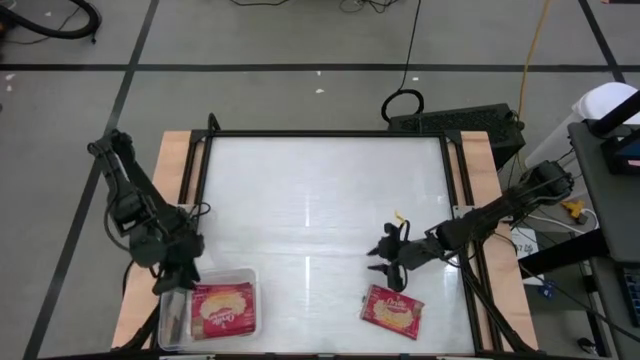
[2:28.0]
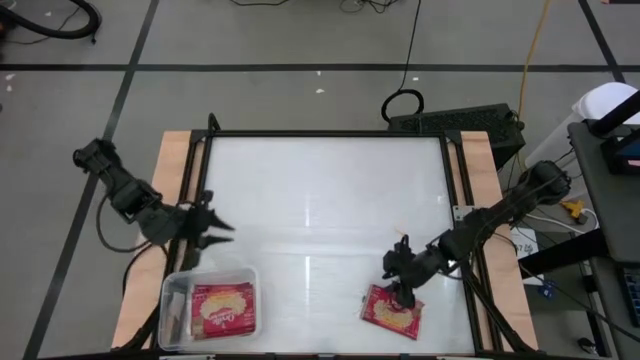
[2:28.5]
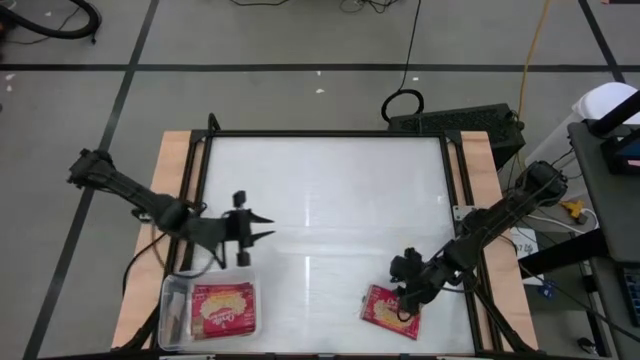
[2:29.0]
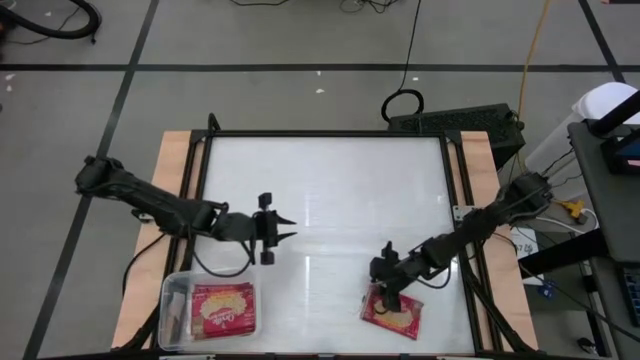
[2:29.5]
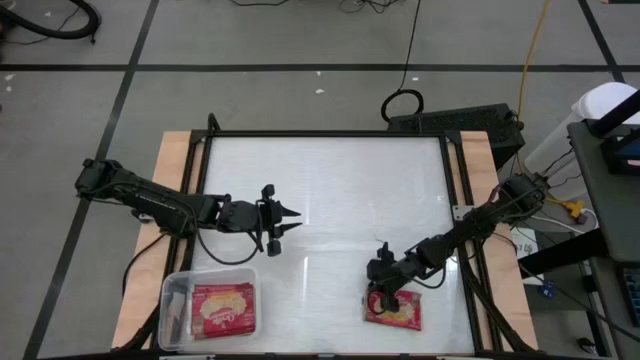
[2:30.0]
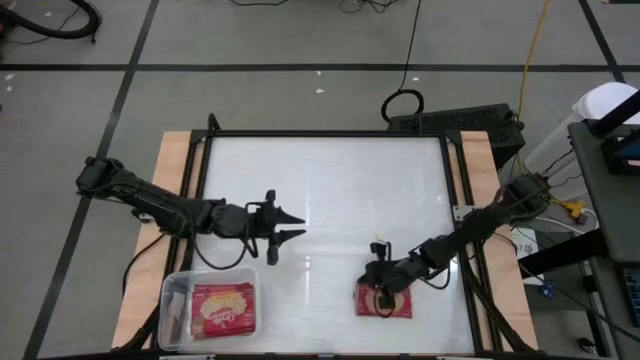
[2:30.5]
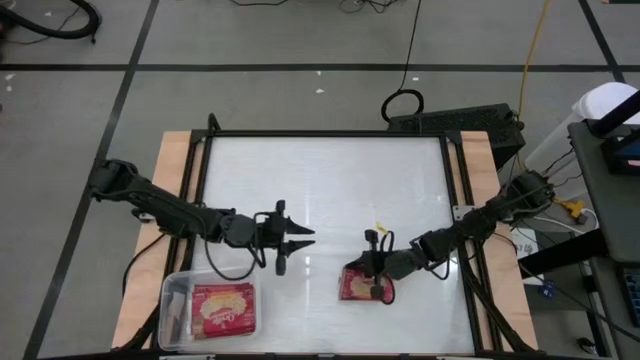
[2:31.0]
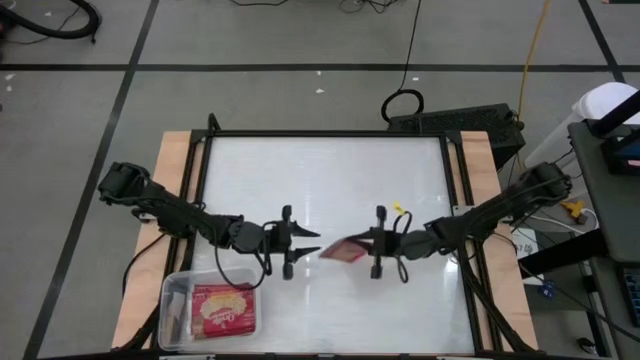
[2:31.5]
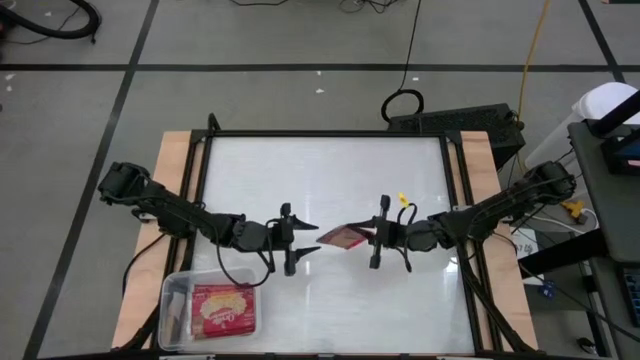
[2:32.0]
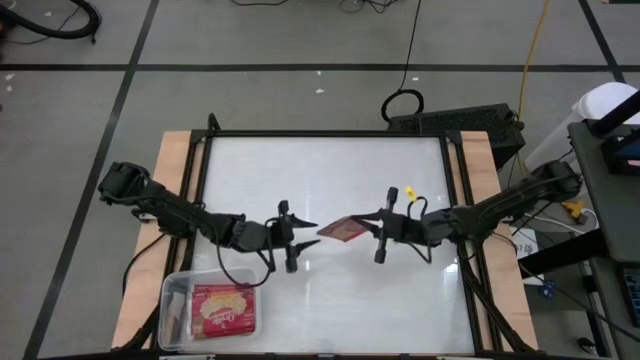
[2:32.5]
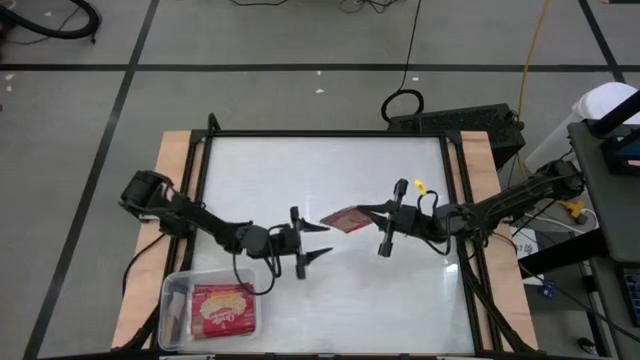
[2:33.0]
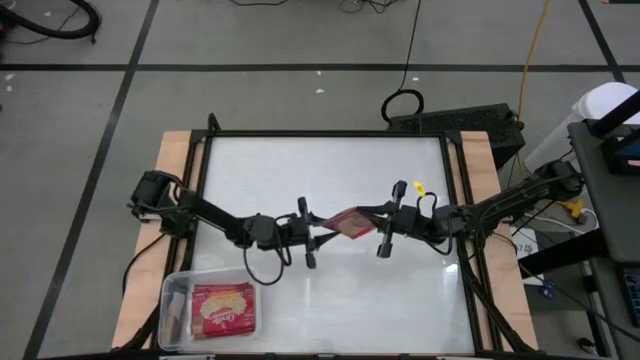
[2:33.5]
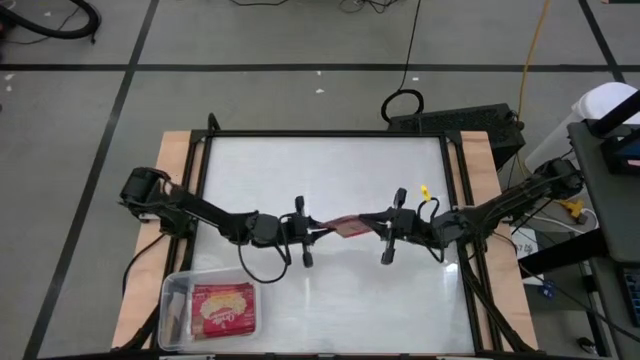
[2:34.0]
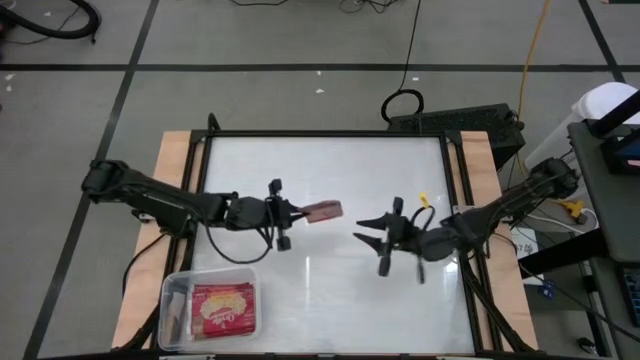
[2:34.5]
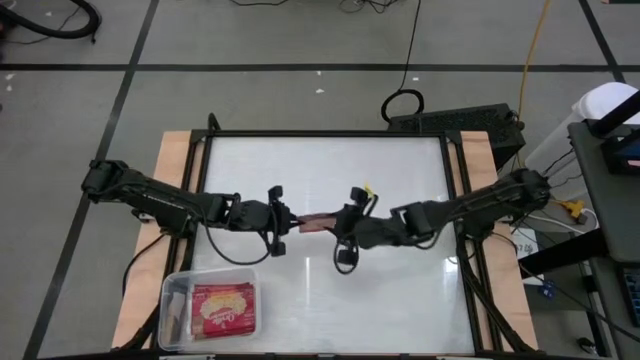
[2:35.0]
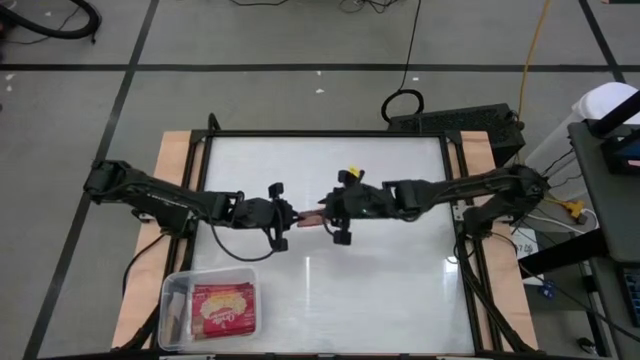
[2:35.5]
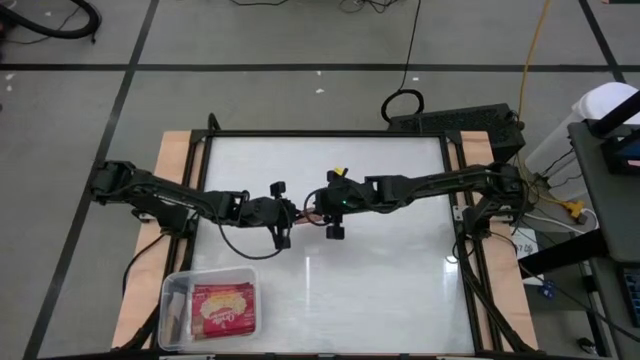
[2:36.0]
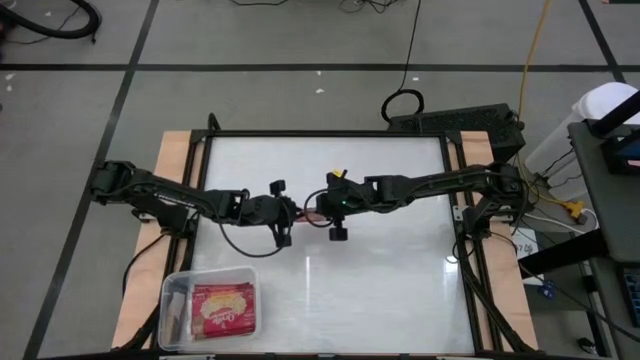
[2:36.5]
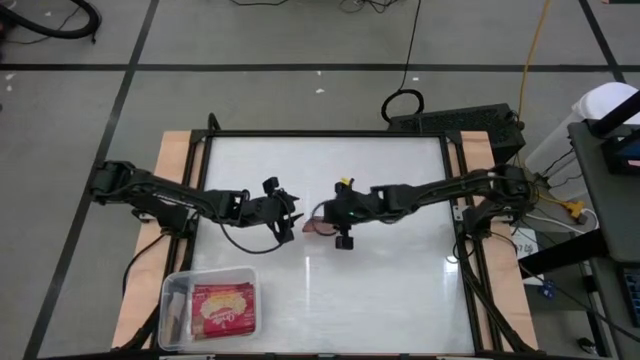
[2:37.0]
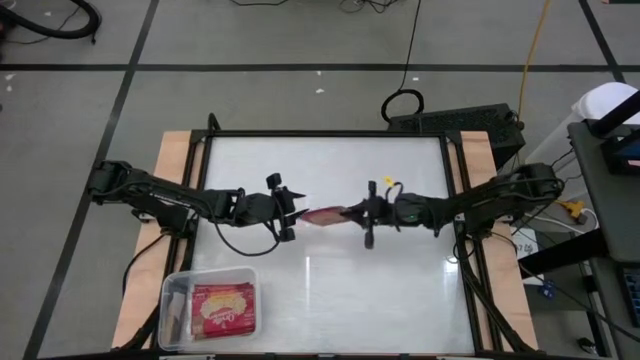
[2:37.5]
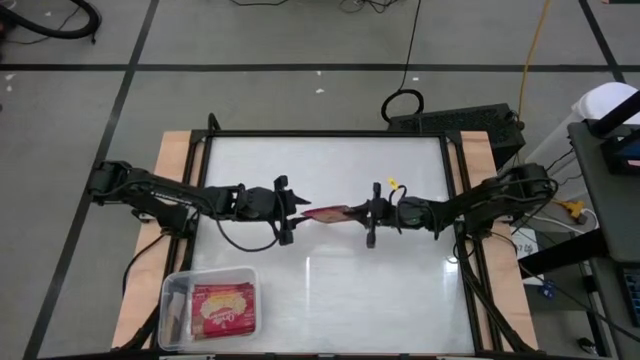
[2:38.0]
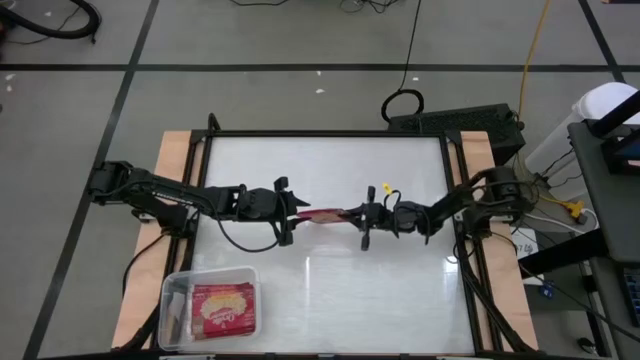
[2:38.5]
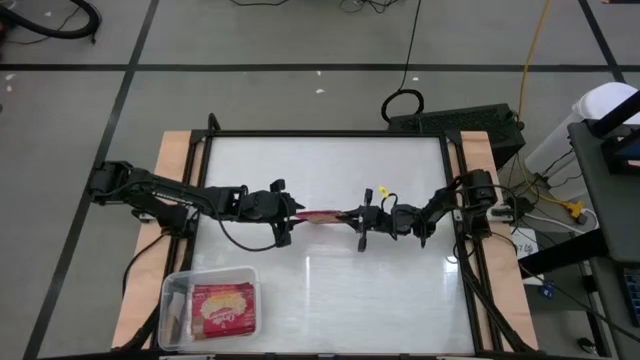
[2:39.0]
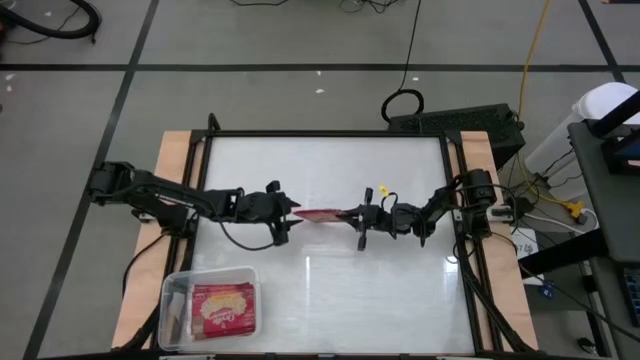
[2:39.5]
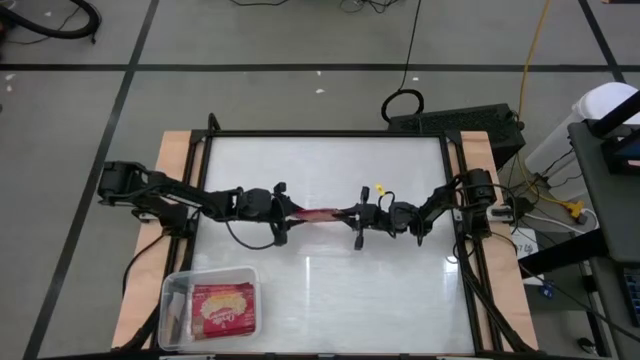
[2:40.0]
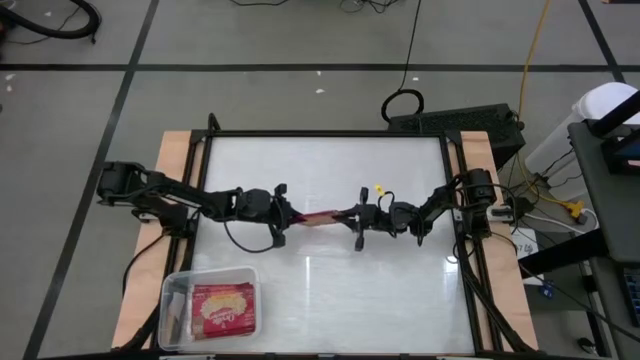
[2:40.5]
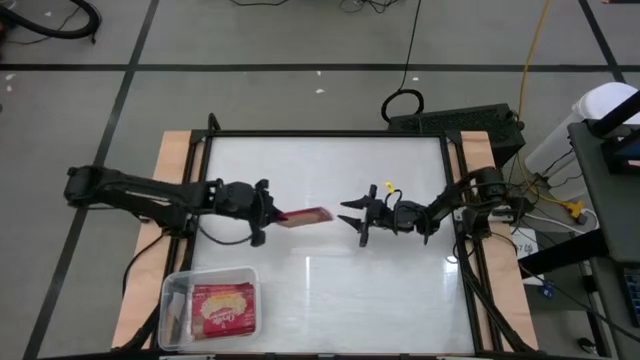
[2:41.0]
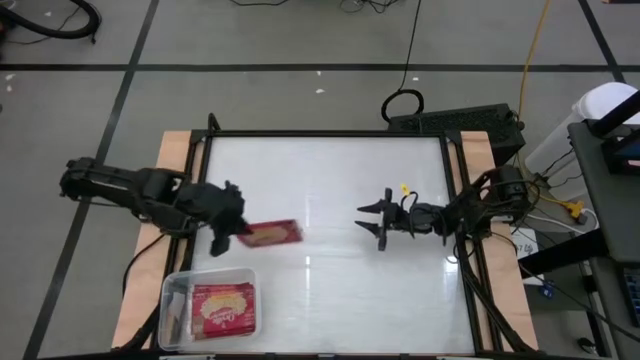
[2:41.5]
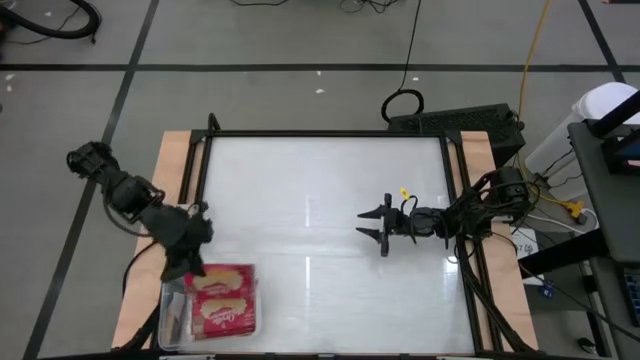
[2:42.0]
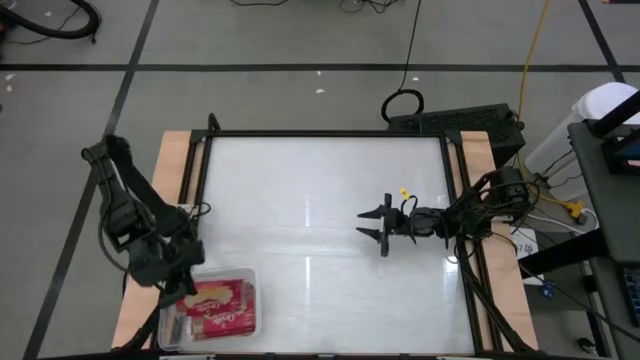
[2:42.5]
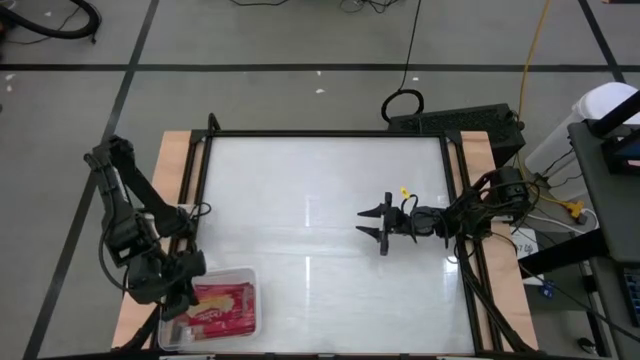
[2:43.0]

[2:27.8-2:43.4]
Task: Sort popcorn bags into baskets
Put the popcorn bag into the transparent bin

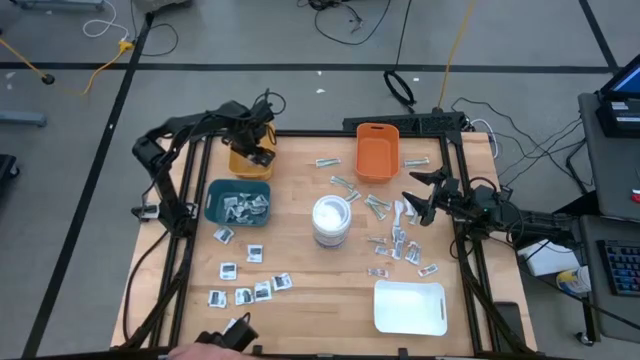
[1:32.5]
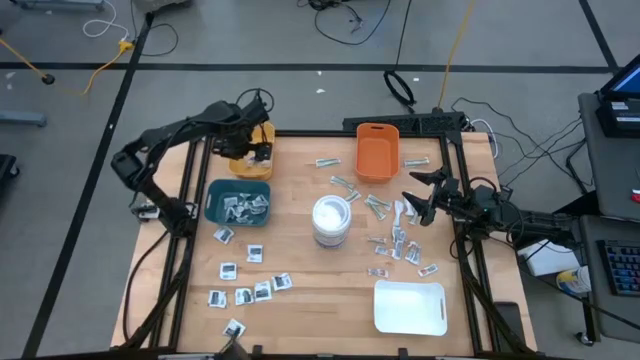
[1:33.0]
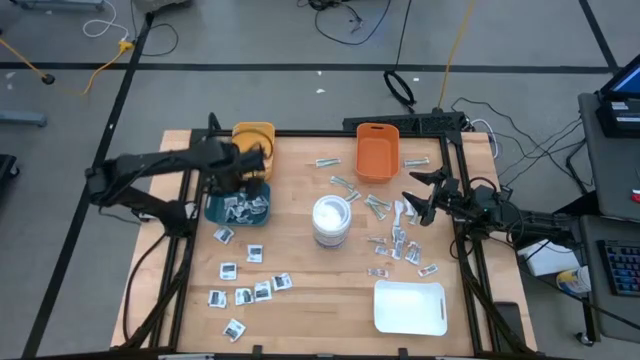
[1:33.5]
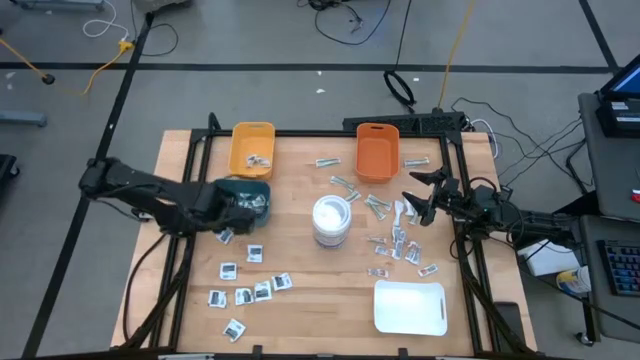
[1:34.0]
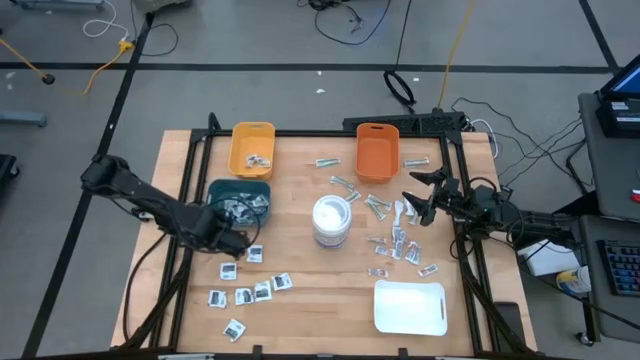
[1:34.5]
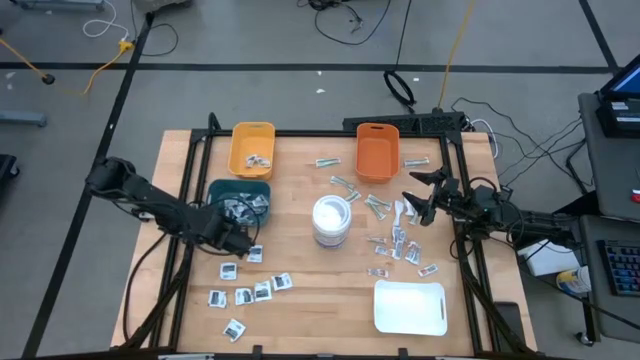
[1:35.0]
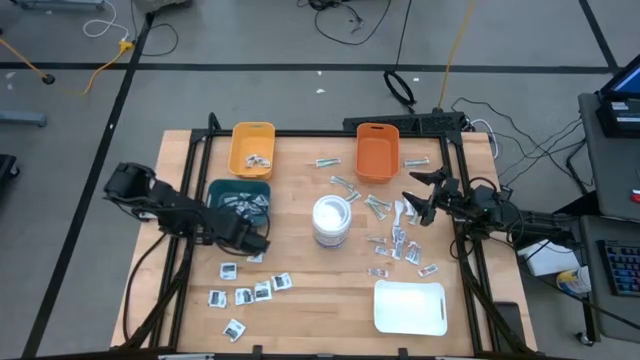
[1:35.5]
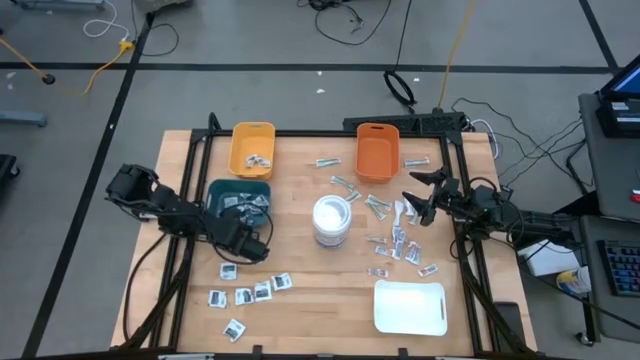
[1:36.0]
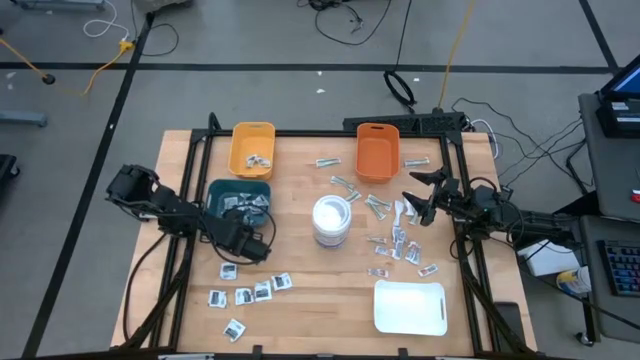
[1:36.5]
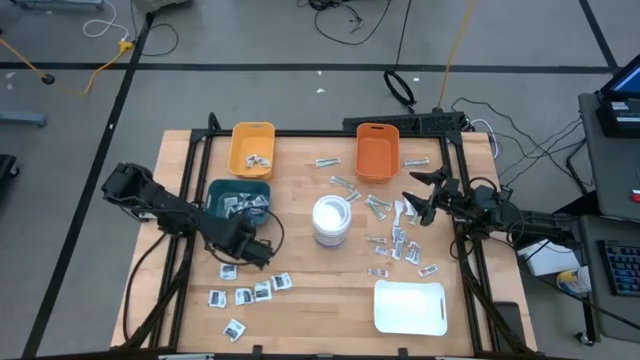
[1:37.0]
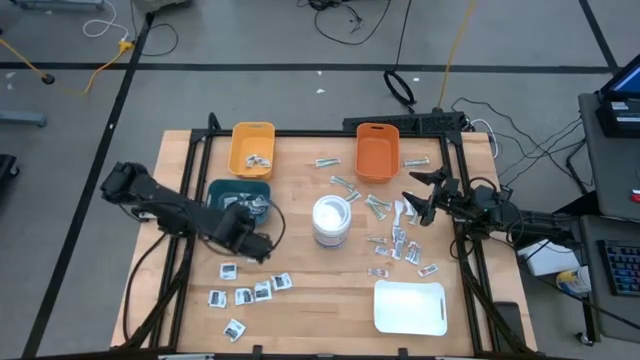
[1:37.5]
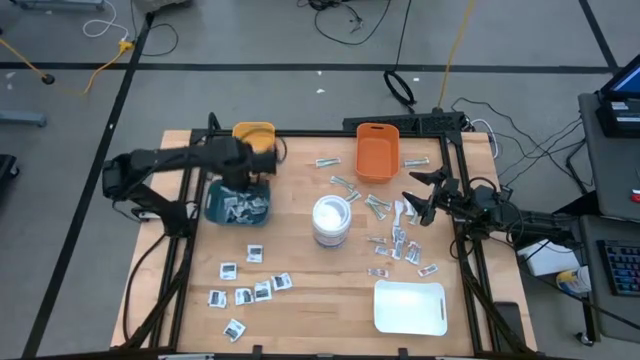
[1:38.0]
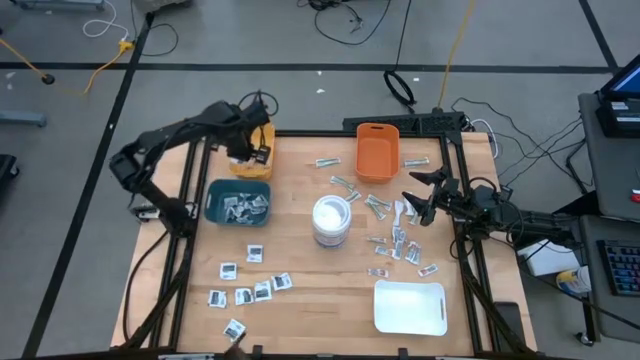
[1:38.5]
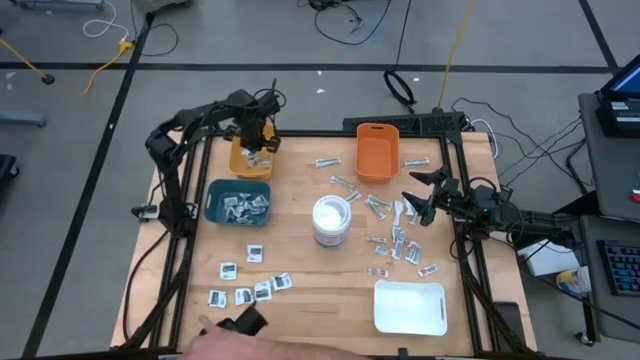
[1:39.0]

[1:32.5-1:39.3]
Task: Pick & Place First Aid Supplies
Put the black pad into the yellow bin
